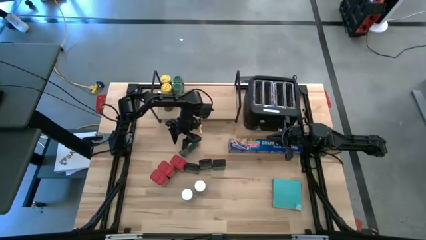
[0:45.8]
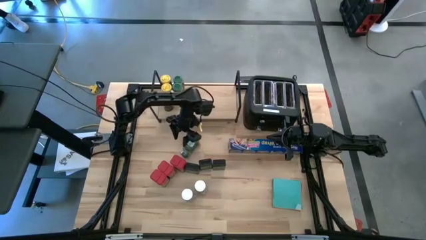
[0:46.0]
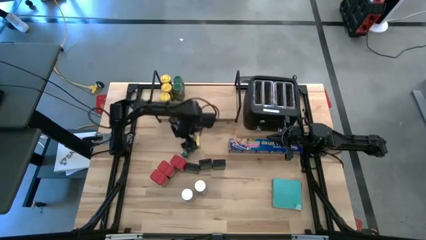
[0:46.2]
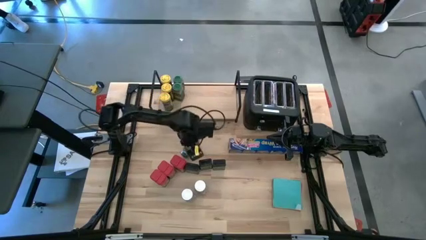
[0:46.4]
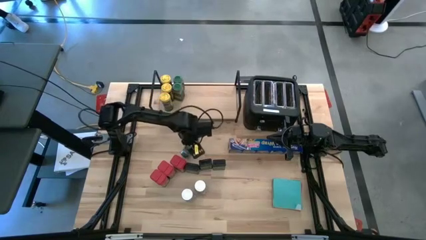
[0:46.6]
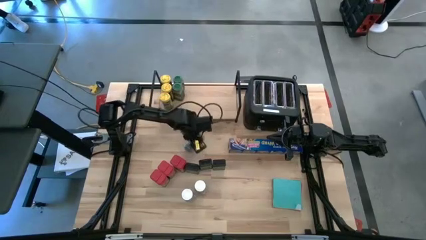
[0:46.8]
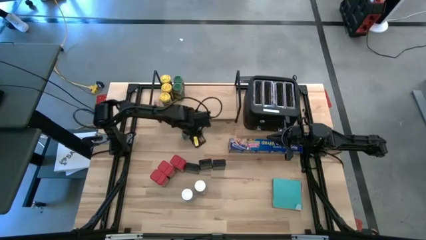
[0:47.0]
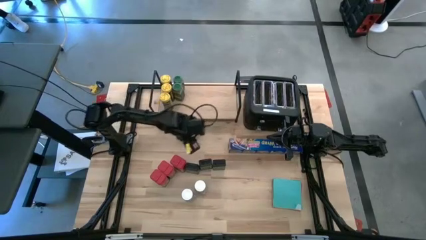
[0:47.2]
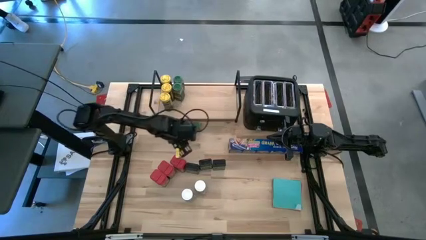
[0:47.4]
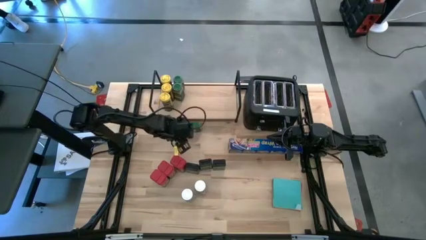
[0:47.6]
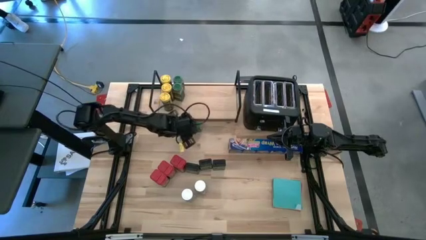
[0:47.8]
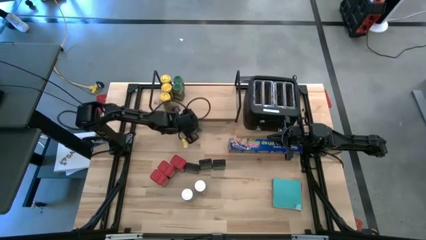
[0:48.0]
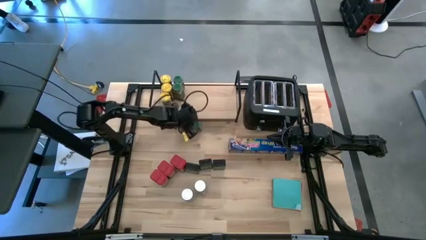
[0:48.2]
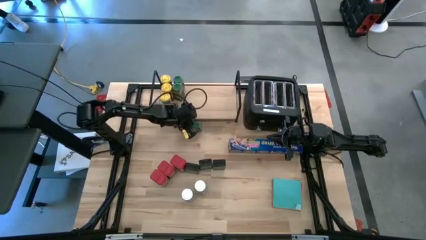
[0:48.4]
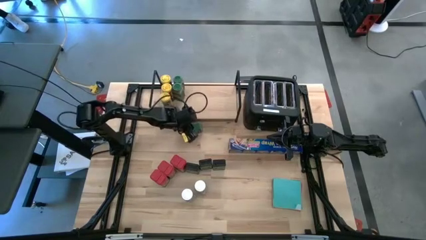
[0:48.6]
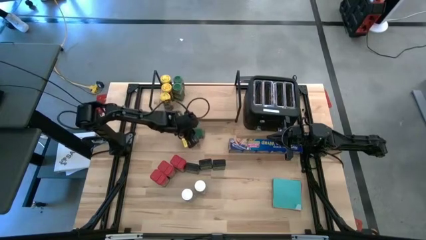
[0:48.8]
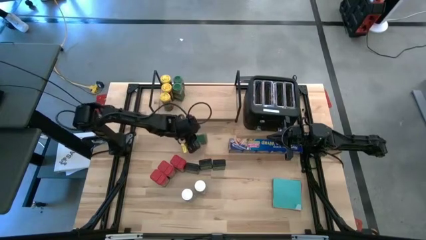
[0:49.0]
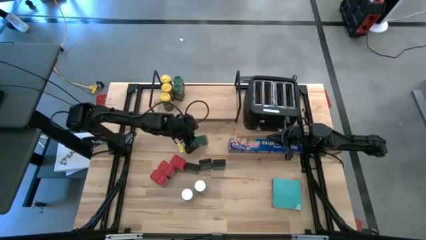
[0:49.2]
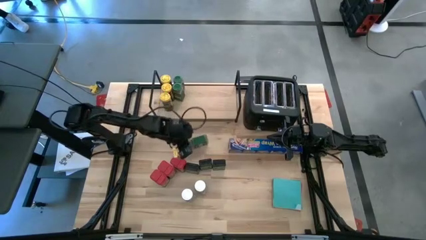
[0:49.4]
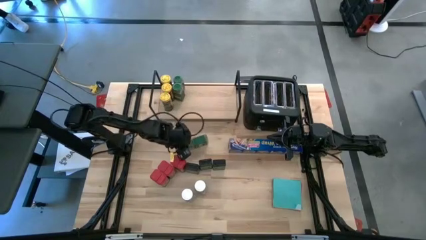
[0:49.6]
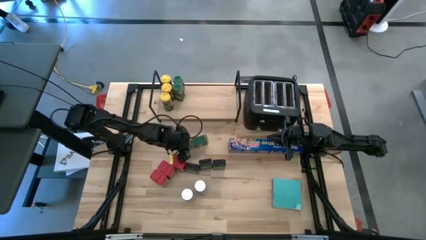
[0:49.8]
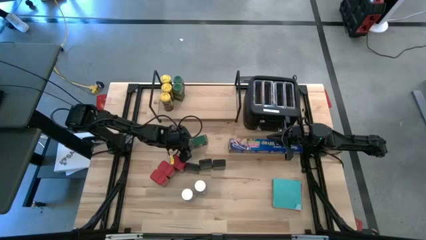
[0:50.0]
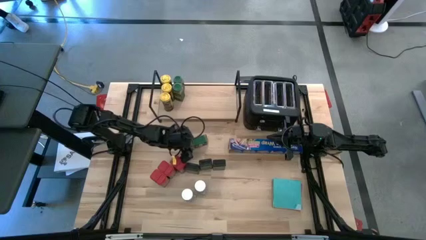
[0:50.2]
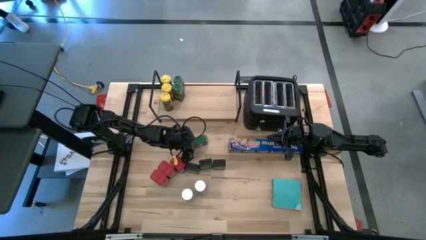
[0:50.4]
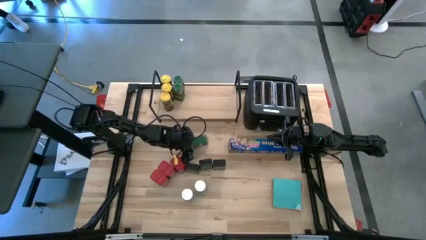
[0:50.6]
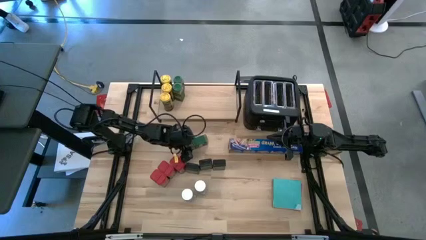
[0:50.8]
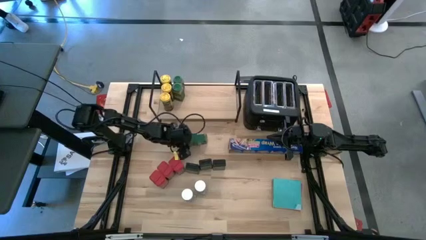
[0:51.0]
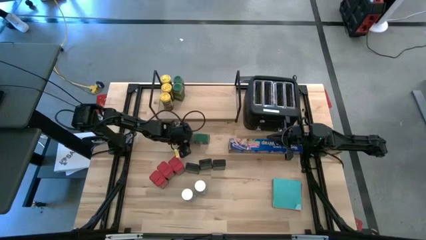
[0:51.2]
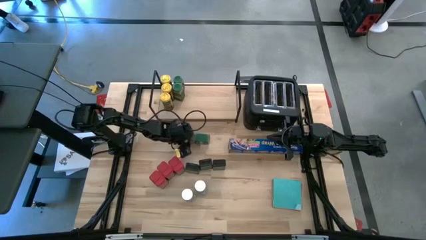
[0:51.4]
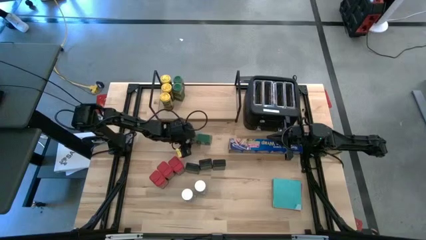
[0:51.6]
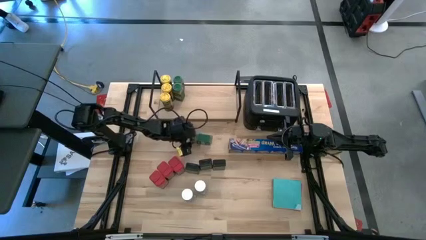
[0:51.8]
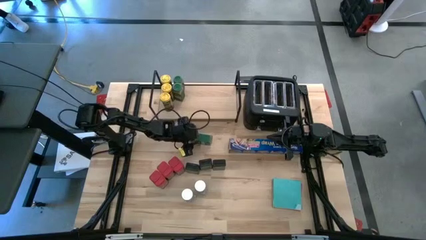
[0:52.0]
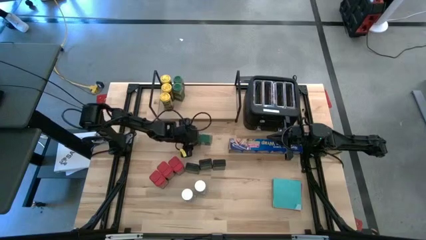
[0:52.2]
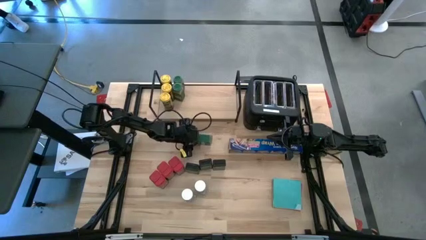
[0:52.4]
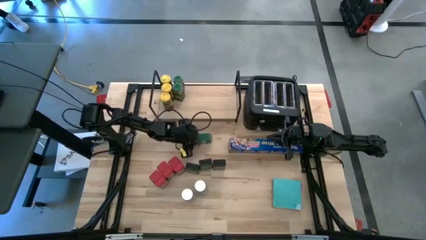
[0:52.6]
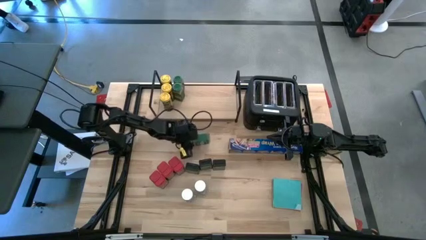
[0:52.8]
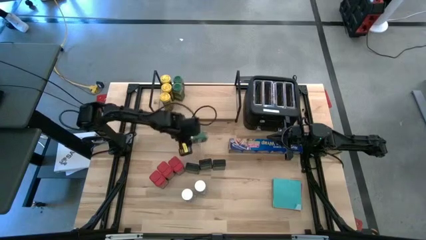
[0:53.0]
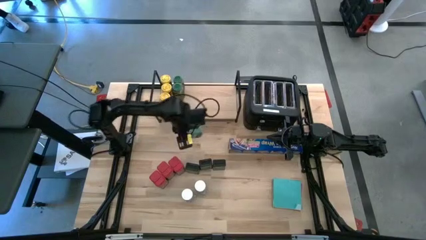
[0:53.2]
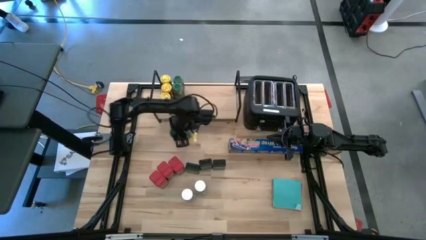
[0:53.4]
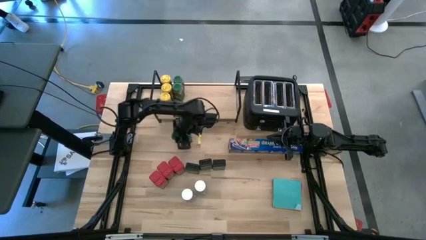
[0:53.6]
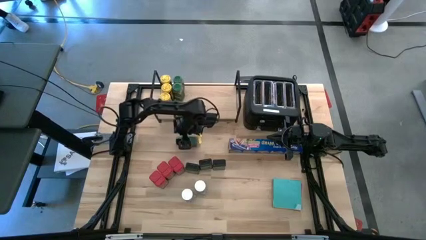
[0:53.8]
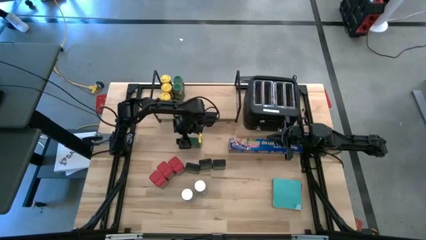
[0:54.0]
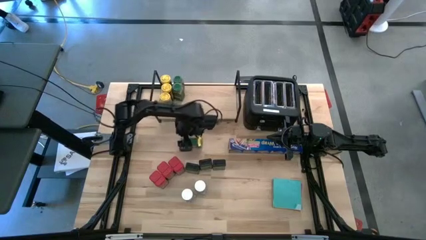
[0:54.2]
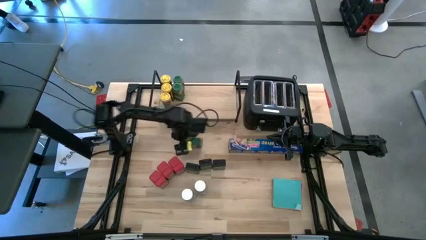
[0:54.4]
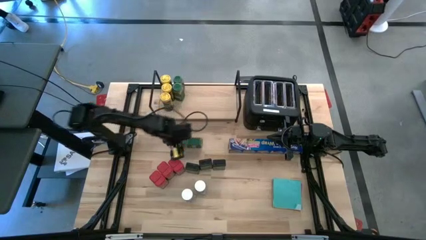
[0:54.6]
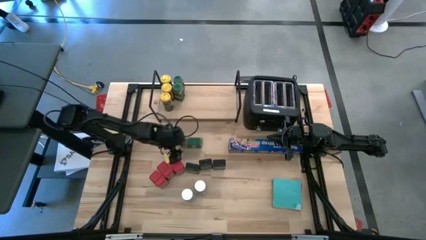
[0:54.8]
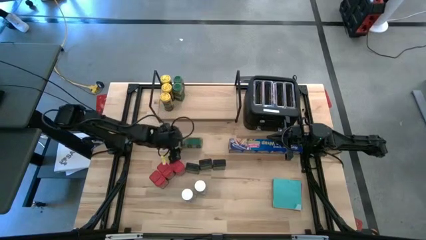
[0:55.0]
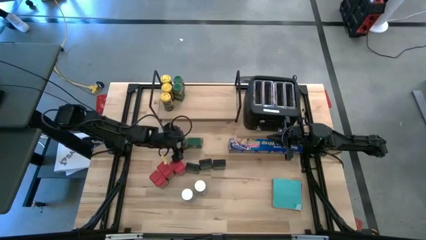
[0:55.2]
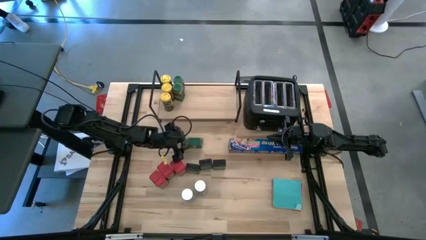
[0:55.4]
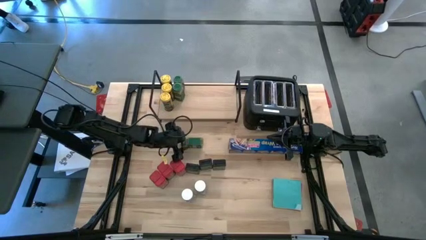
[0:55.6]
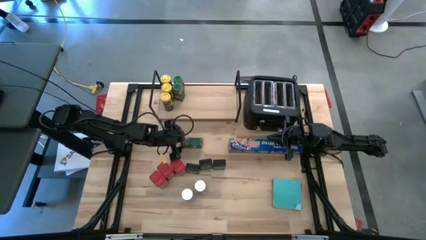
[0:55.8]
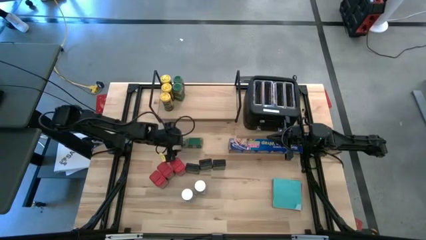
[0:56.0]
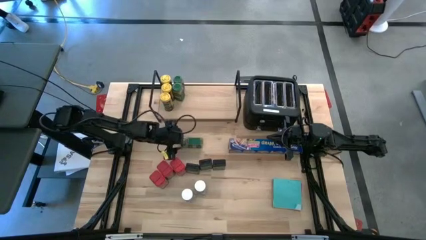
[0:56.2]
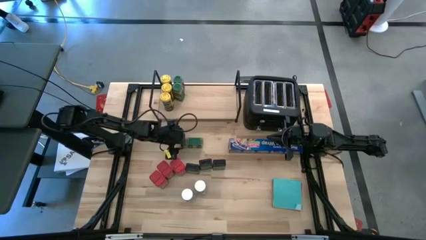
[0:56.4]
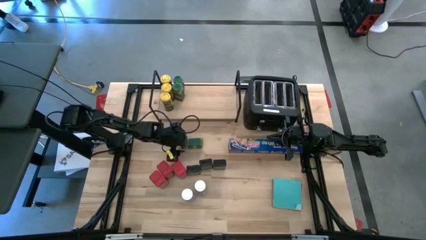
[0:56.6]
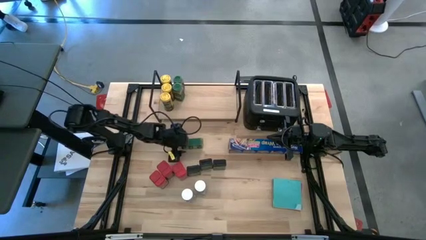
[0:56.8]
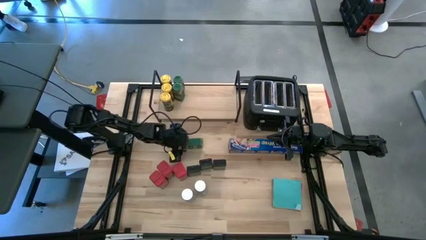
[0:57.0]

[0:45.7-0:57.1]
Task: Shelf spices
Put the green seasoning bottle on the shelf aligned with the other green seasoning bottles

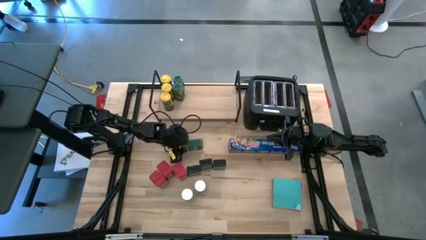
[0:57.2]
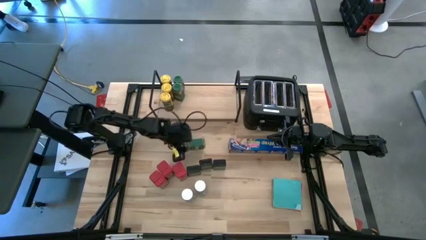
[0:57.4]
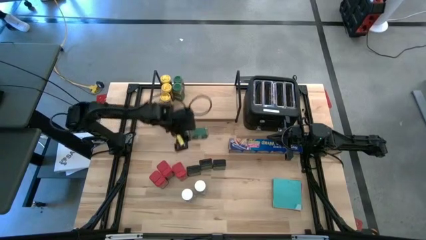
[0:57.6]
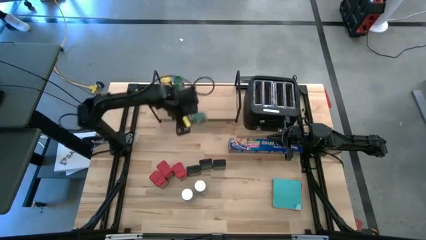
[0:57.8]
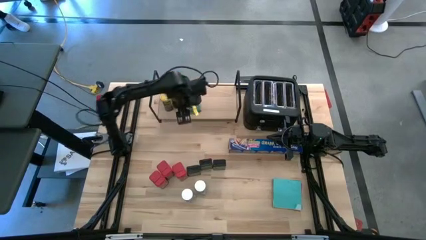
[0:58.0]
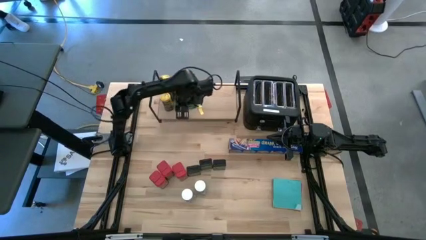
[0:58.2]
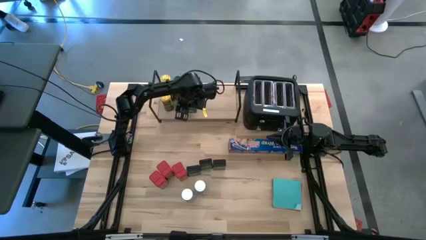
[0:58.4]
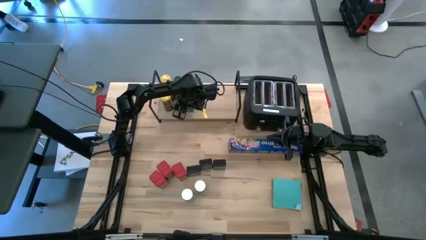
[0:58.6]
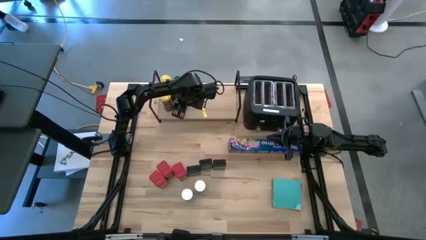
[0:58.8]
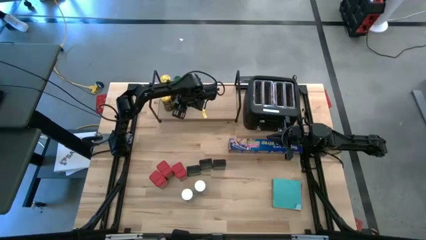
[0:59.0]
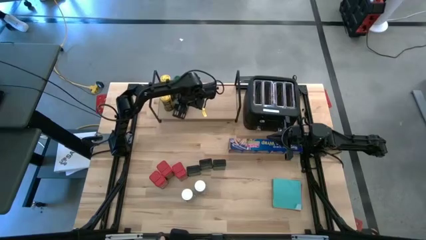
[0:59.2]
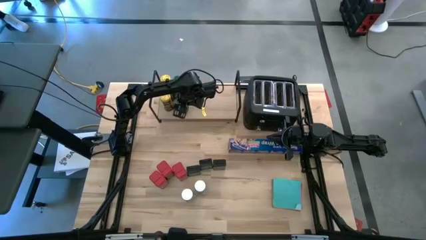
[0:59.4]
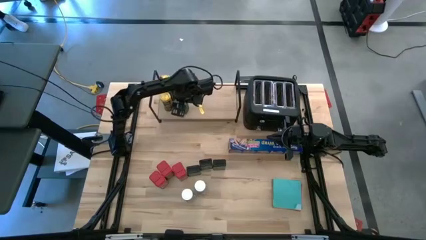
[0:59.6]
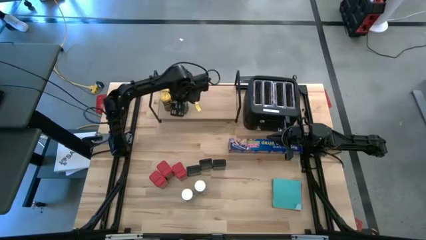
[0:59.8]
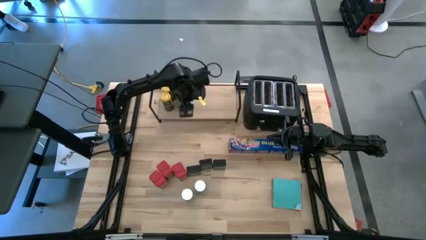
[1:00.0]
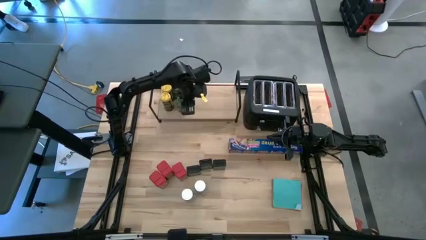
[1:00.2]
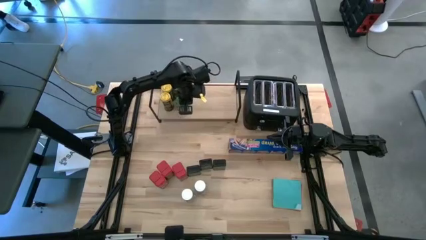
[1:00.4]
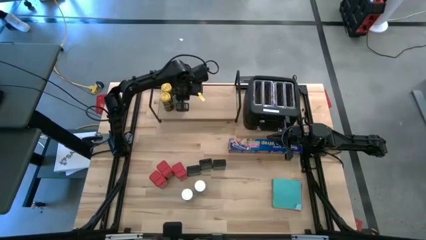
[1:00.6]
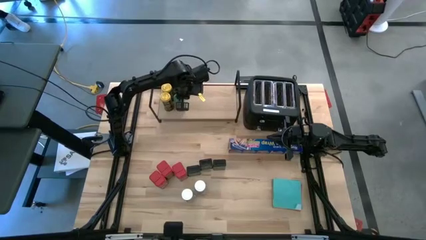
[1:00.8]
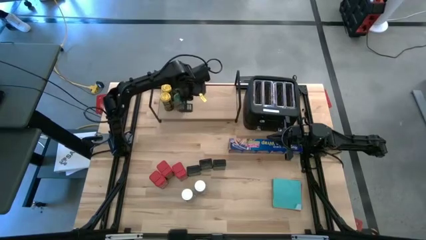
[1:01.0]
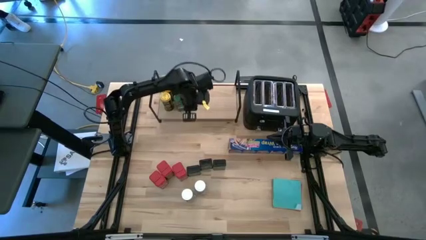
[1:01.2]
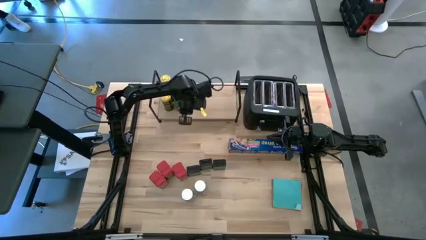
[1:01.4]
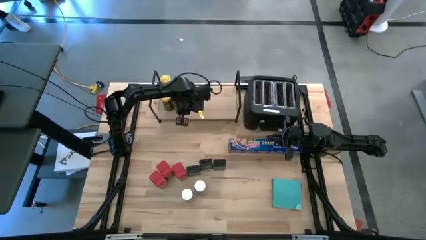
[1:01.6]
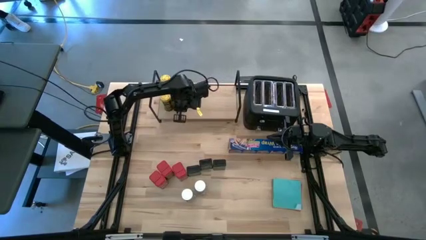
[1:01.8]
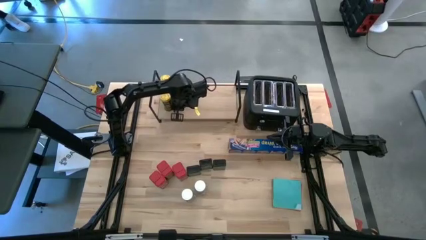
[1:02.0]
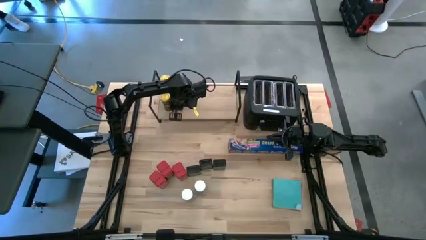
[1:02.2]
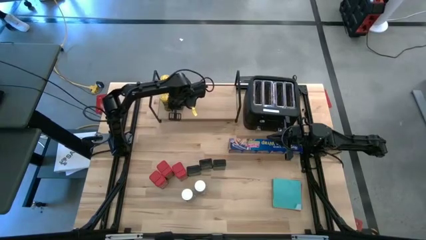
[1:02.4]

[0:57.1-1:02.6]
Put the green seasoning bottle on the shelf aligned with the other green seasoning bottles
